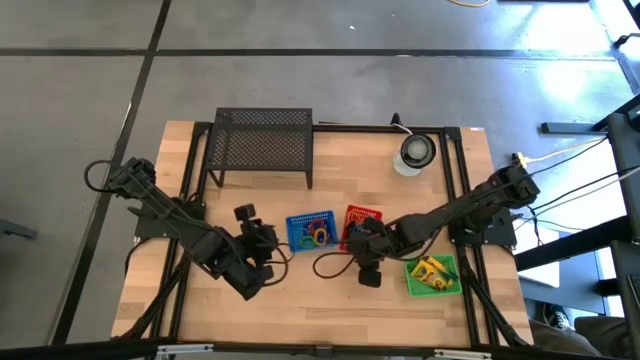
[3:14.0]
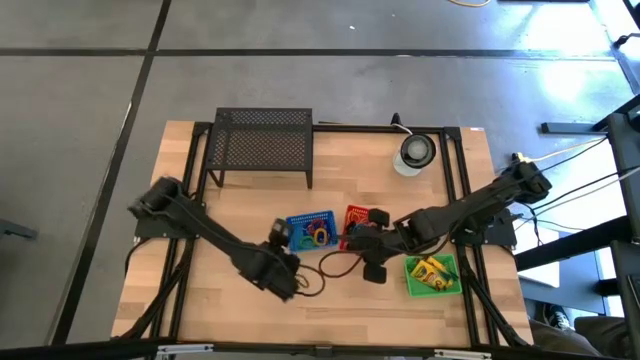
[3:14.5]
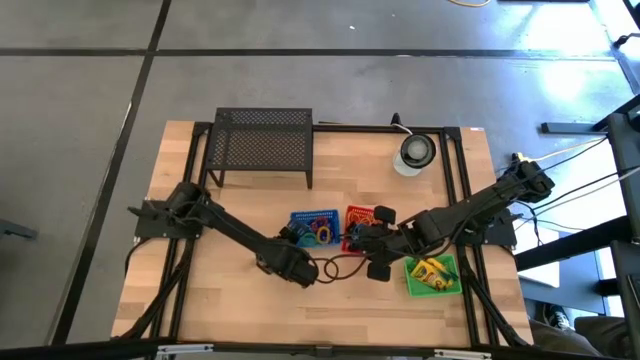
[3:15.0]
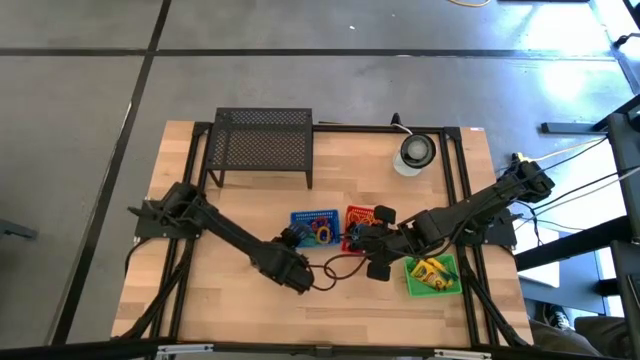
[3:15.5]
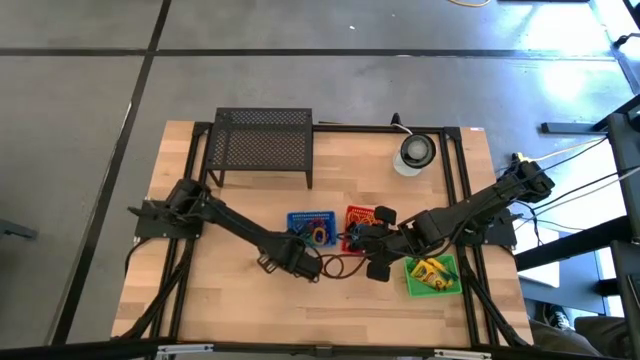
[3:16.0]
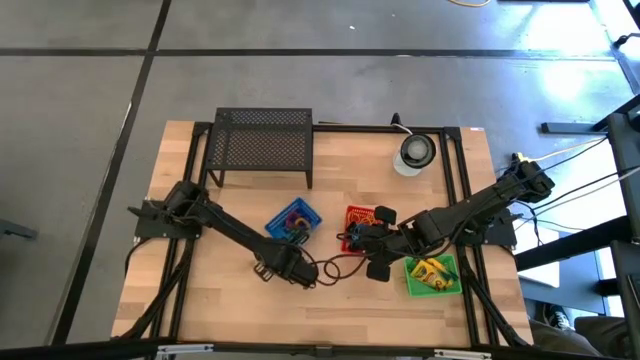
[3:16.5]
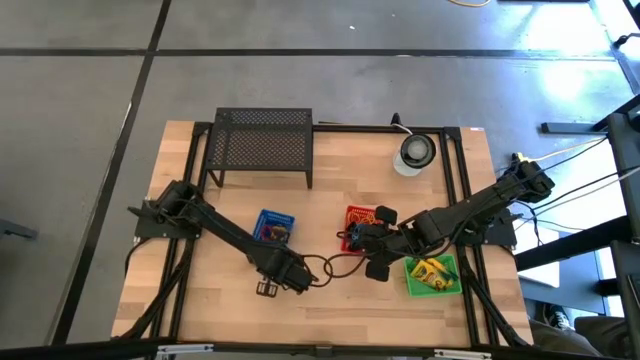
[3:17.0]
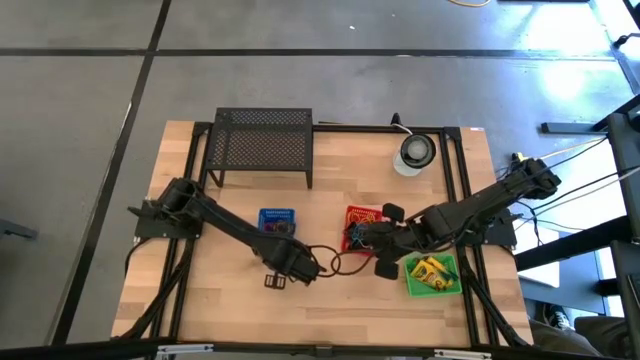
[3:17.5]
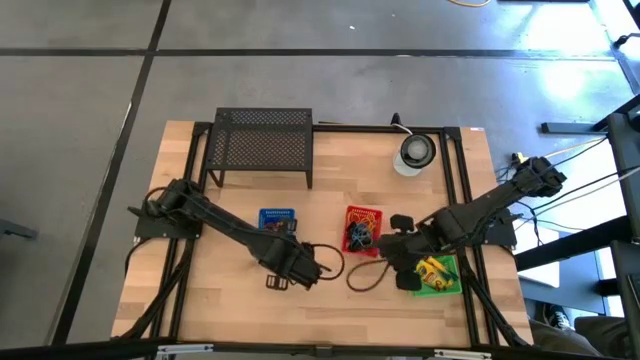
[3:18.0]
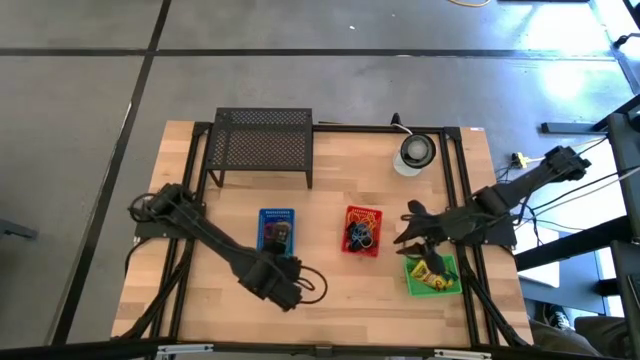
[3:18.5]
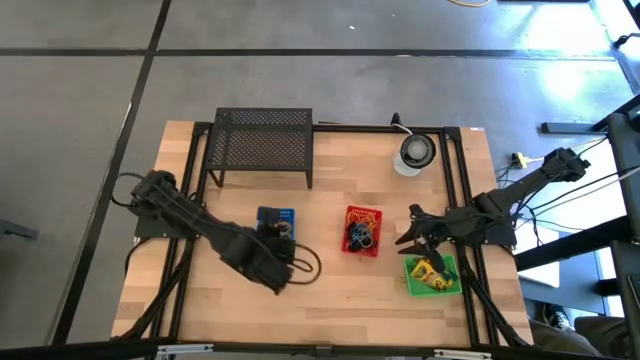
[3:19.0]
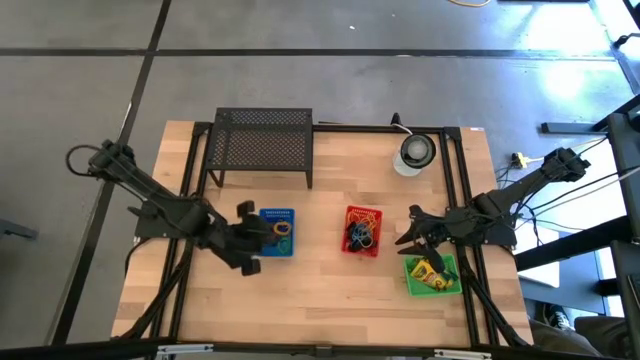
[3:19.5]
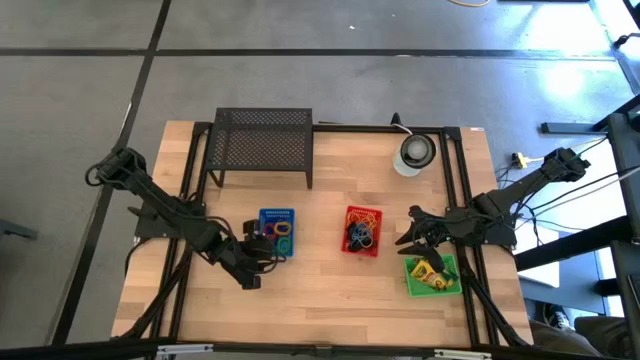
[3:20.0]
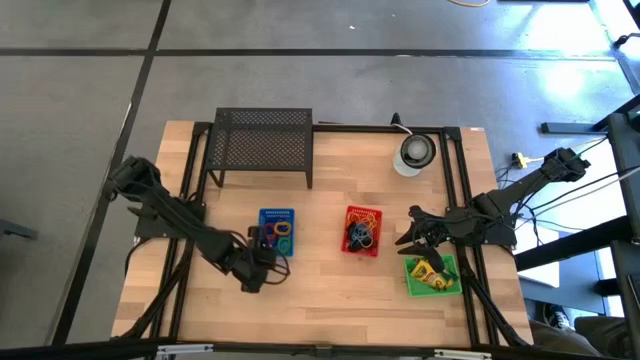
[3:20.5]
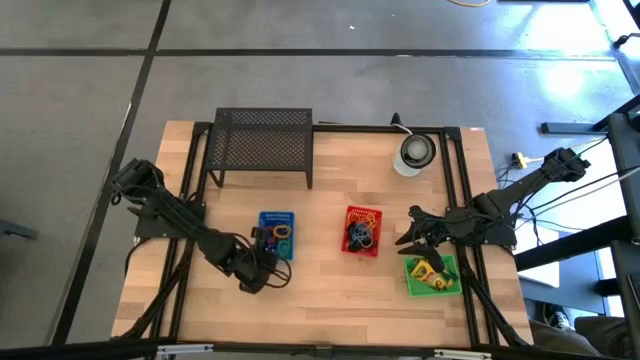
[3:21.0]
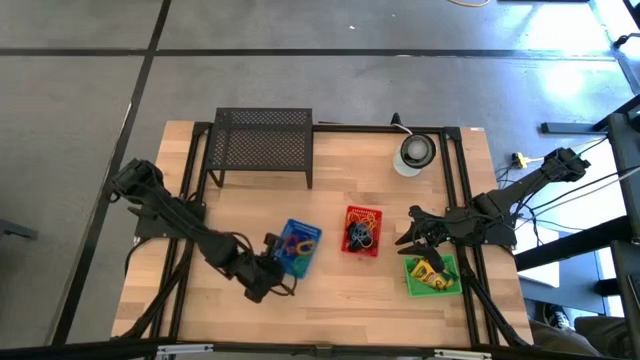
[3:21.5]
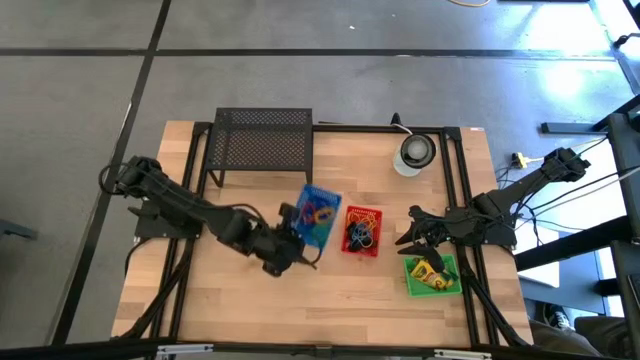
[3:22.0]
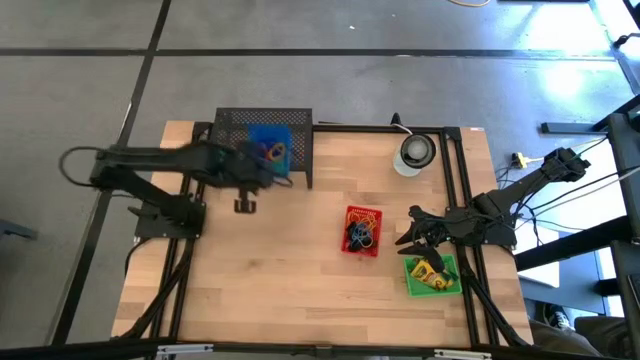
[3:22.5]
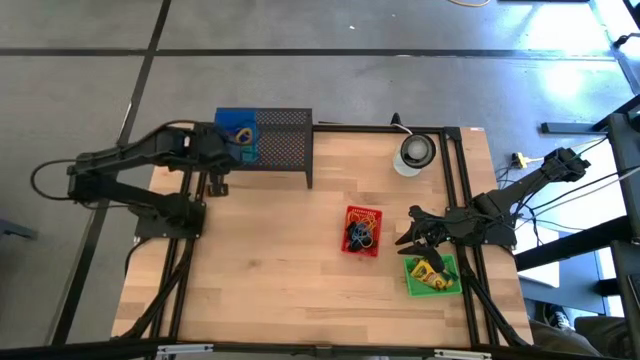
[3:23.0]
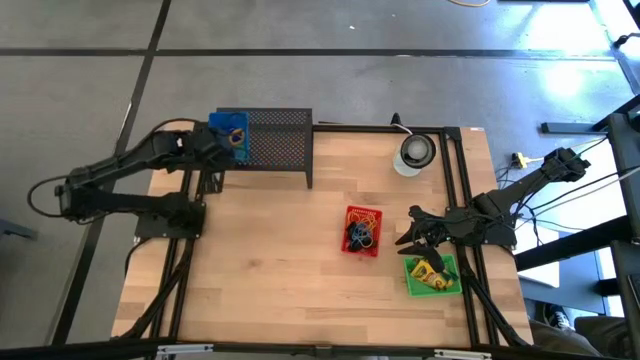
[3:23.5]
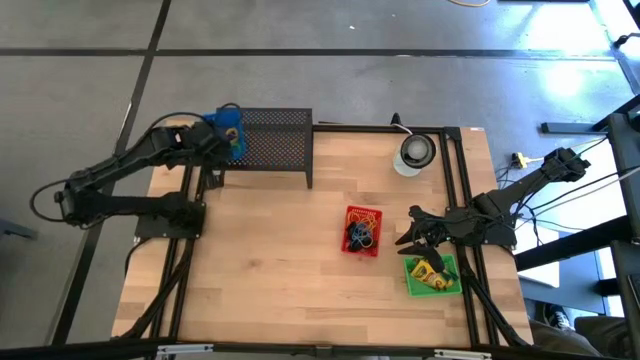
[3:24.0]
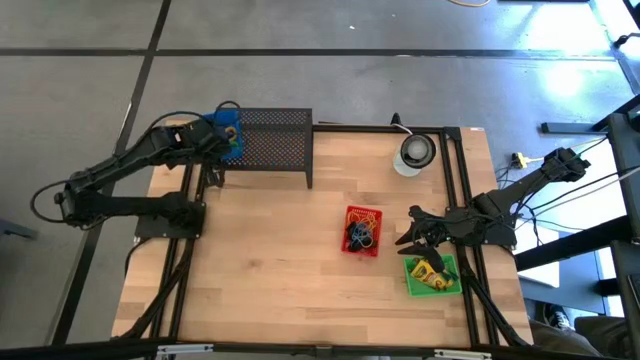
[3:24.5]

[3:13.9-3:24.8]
Task: Pick & Place Office Desk Supplies
Put the blue bin with wrist bands on the shelf

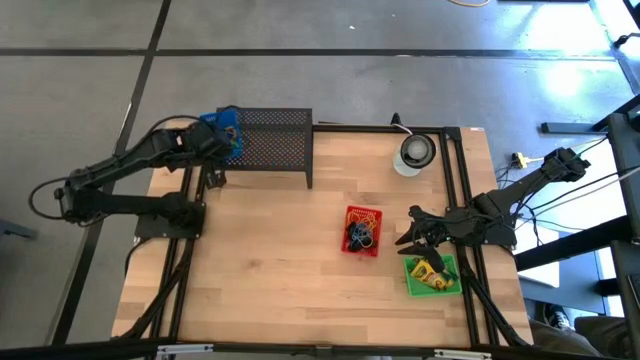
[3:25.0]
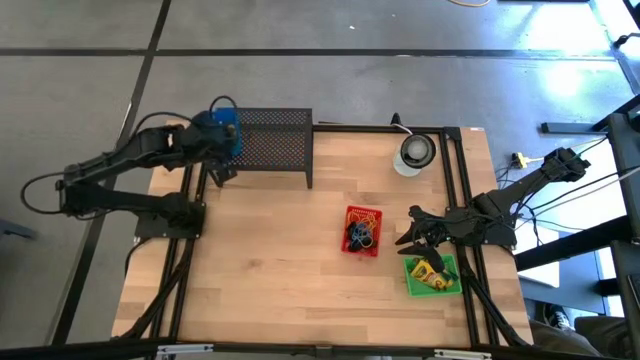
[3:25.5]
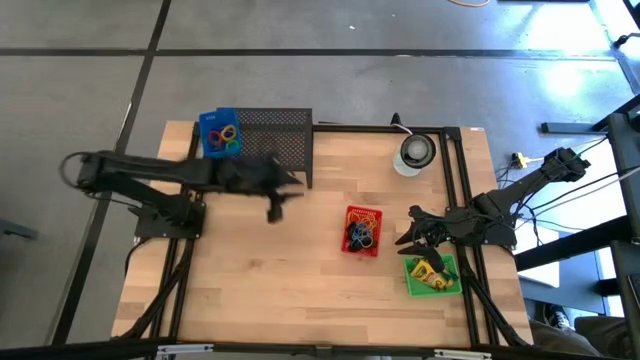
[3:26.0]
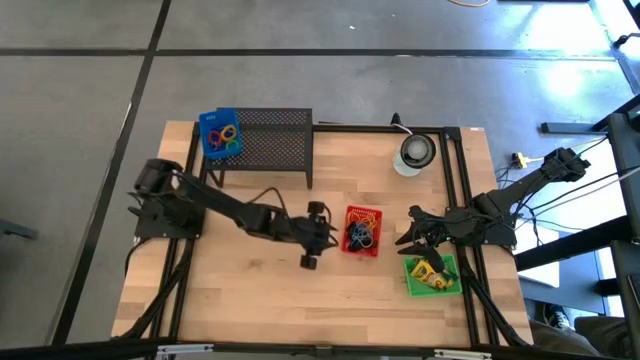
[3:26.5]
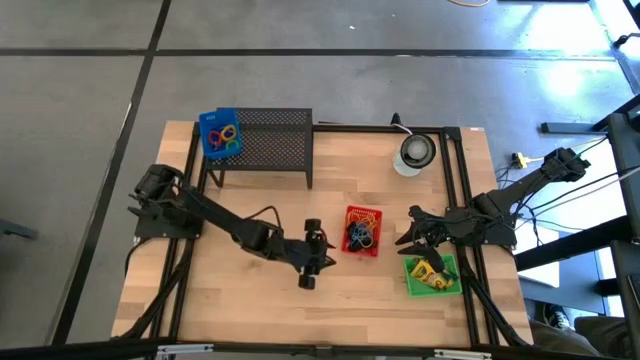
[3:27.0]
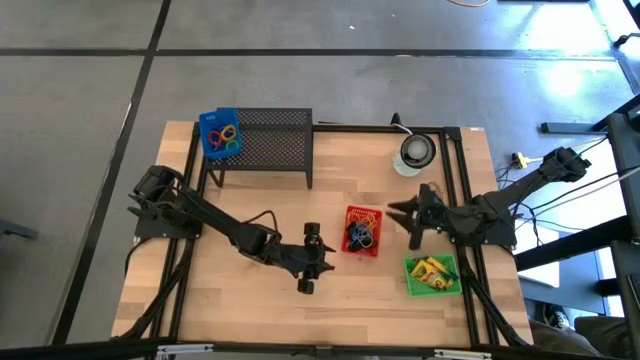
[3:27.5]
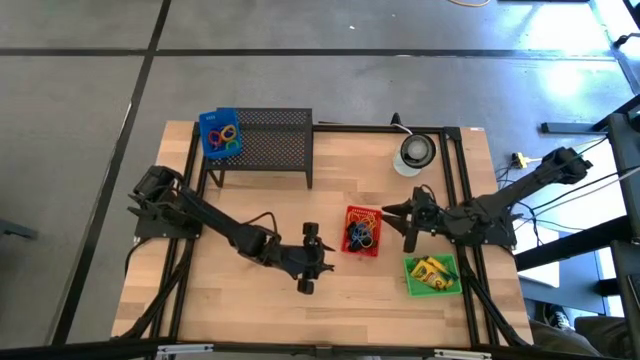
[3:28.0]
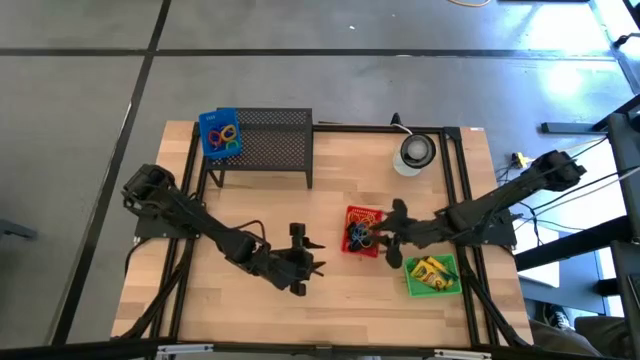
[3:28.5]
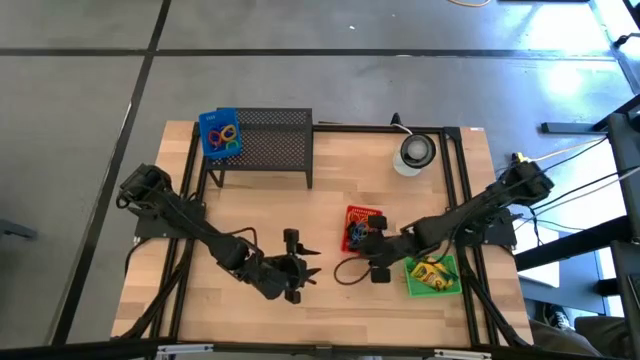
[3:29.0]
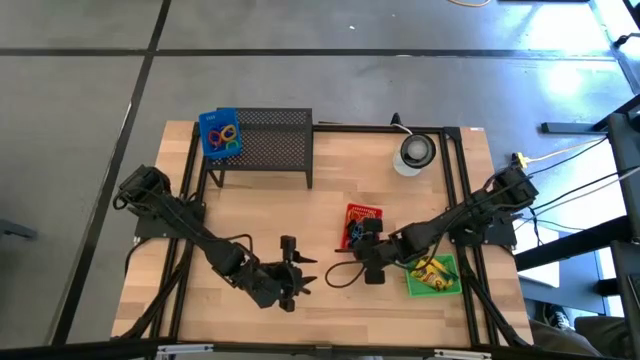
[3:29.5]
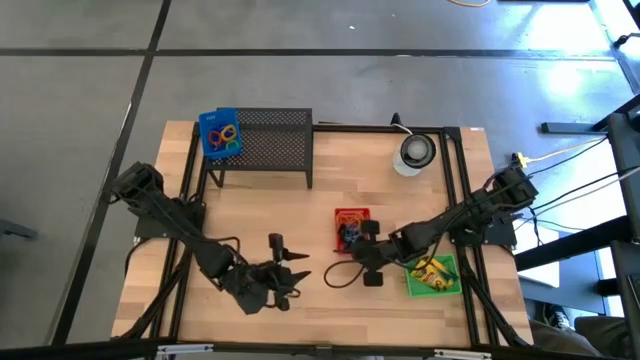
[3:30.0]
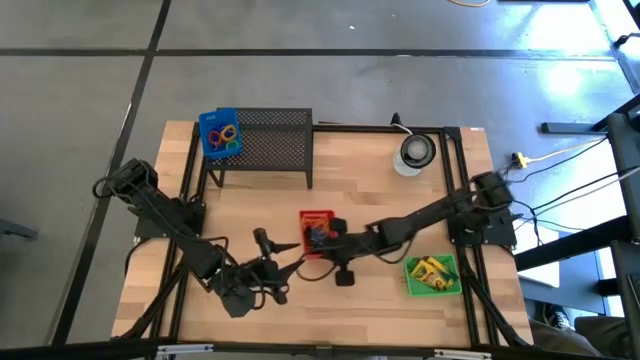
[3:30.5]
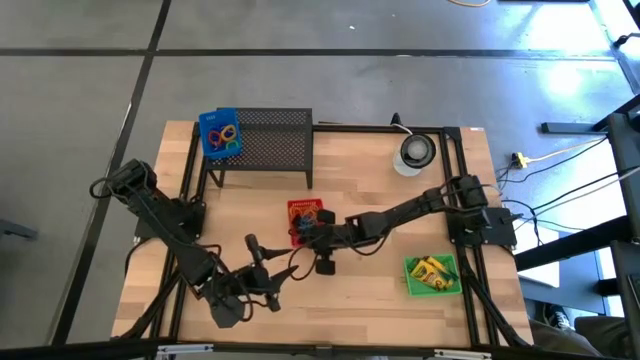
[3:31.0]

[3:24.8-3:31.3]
Move the red bin with rubber bands to the middle of the table

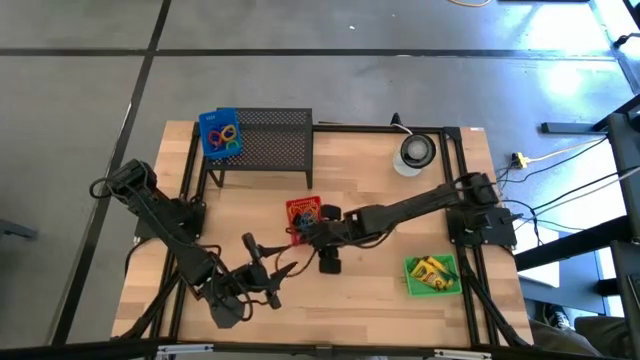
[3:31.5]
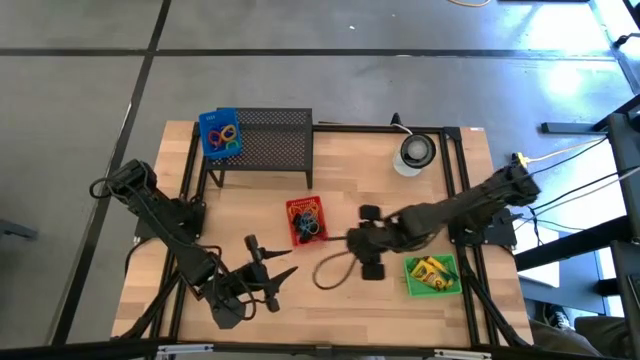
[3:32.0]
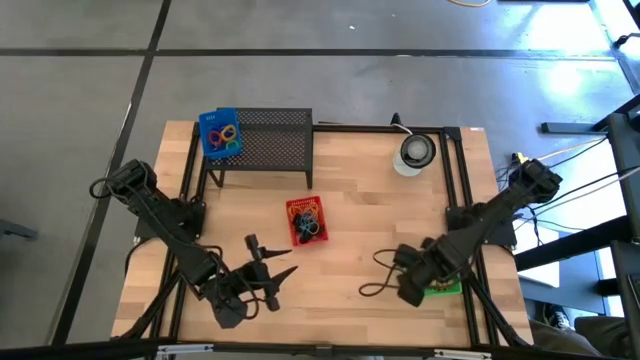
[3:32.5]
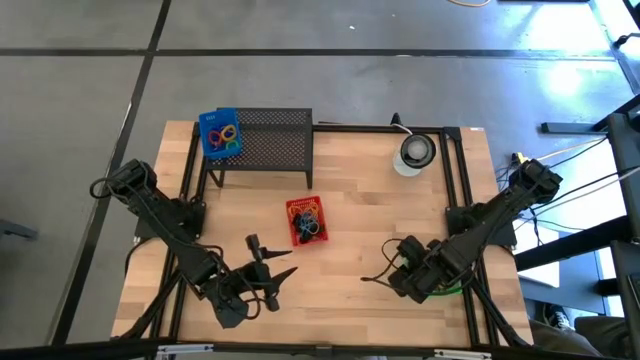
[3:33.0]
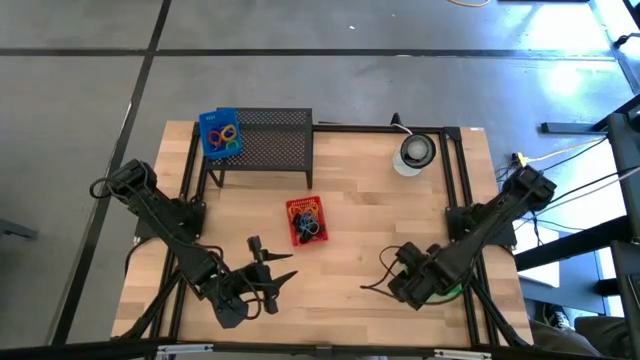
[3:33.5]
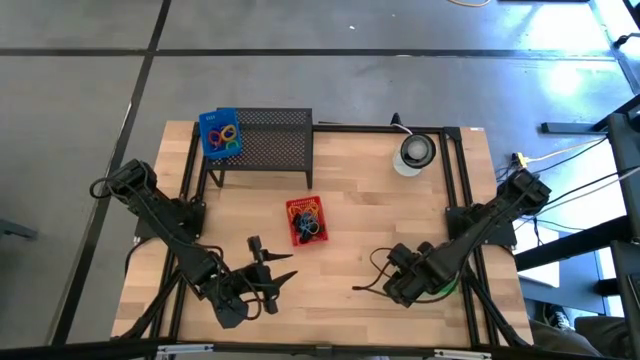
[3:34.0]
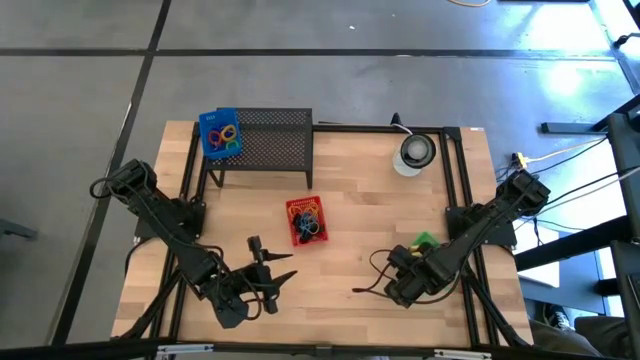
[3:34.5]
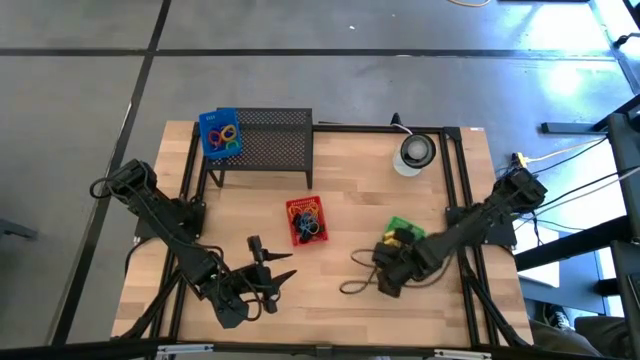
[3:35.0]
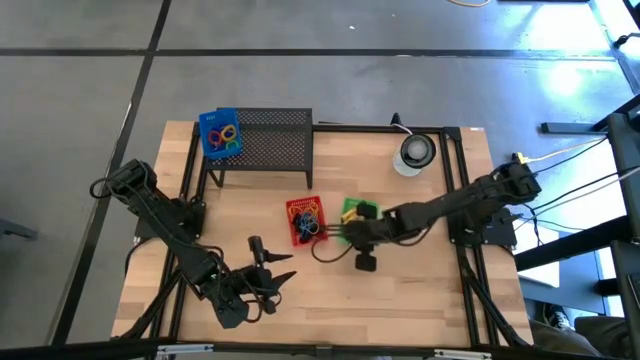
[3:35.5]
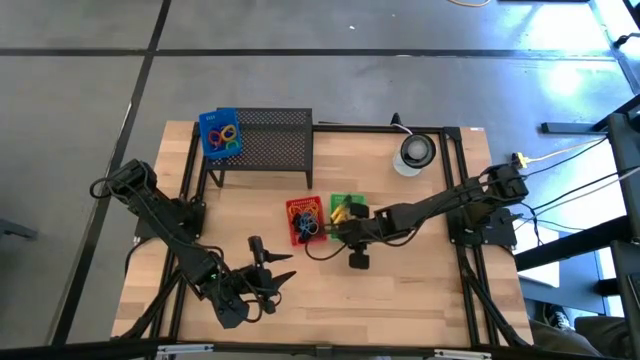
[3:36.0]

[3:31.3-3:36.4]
Move the green bin with crayon boxes to the middle of the table
